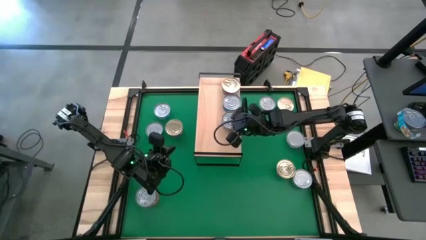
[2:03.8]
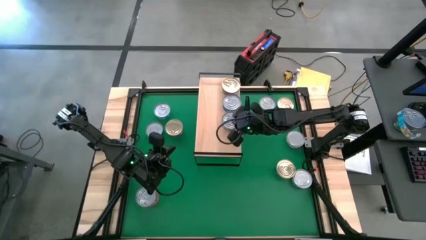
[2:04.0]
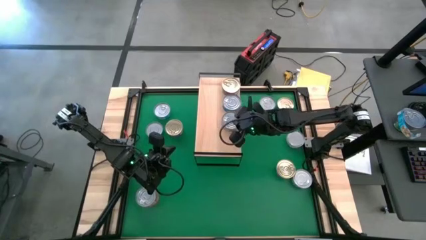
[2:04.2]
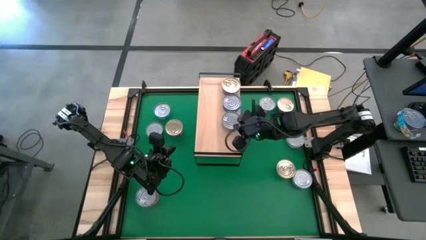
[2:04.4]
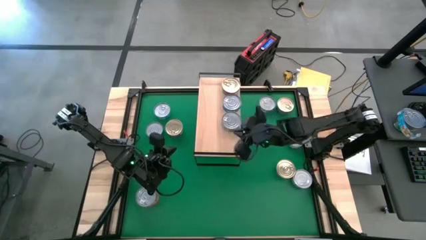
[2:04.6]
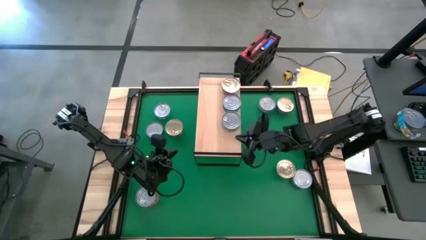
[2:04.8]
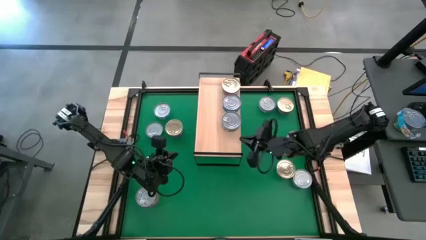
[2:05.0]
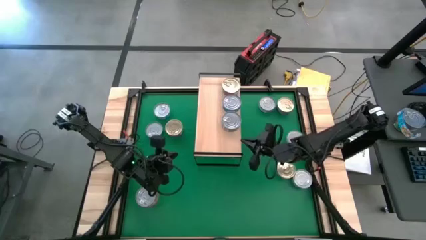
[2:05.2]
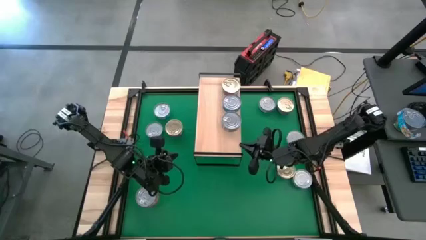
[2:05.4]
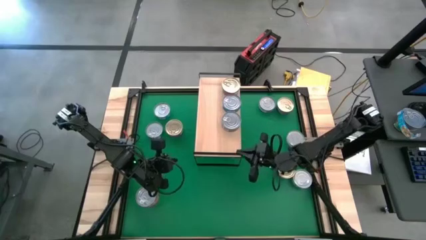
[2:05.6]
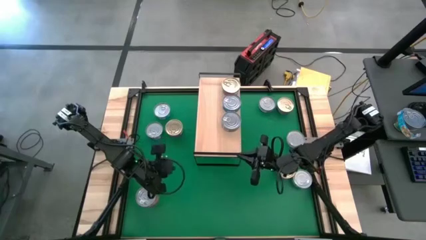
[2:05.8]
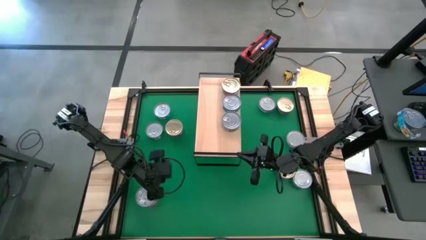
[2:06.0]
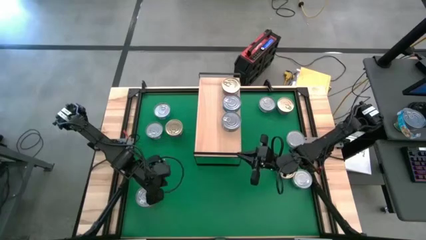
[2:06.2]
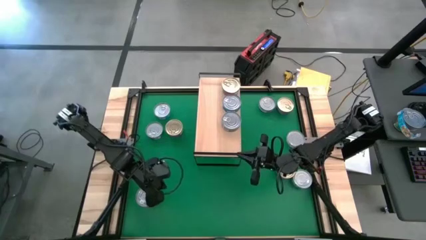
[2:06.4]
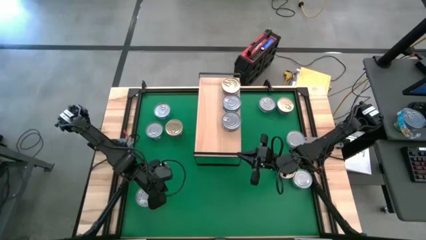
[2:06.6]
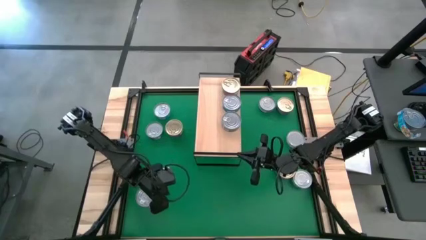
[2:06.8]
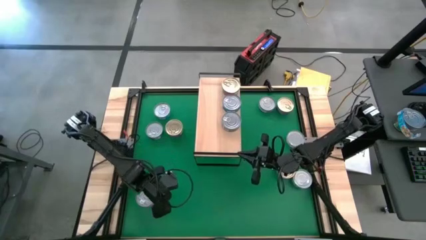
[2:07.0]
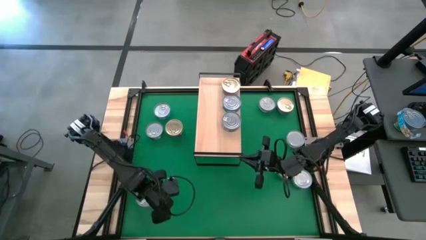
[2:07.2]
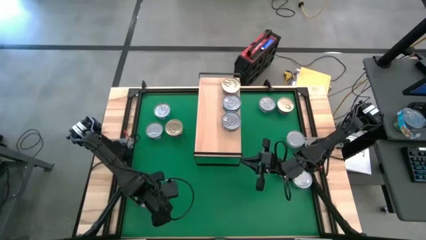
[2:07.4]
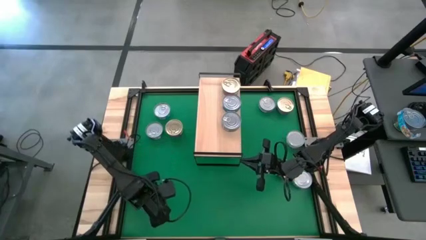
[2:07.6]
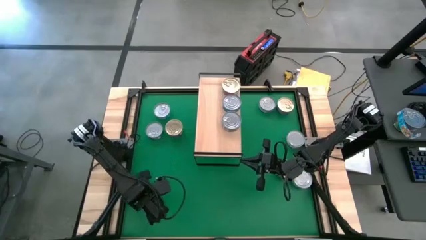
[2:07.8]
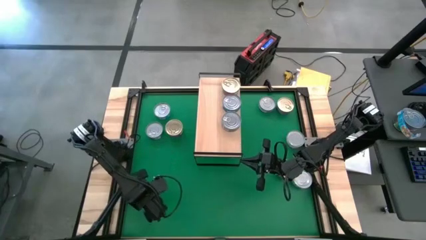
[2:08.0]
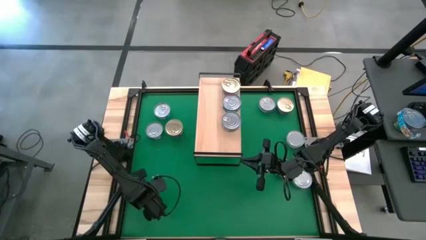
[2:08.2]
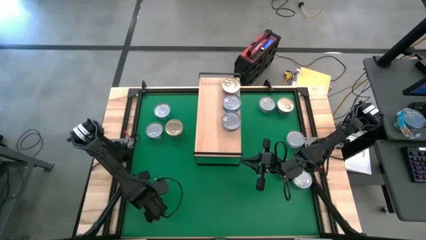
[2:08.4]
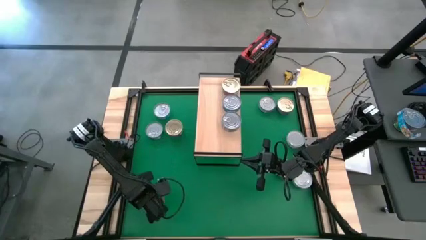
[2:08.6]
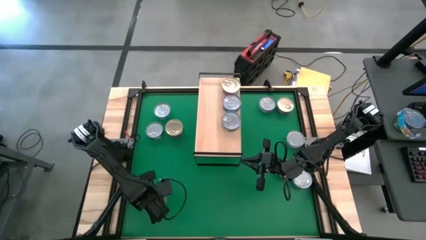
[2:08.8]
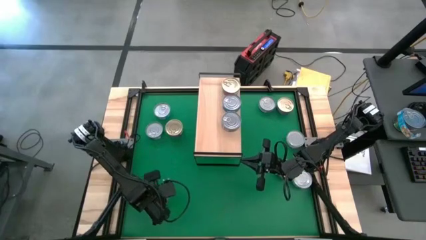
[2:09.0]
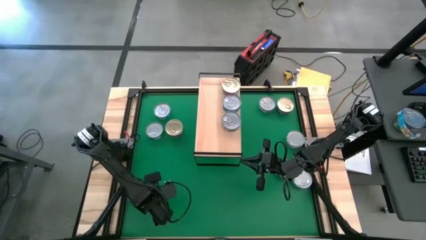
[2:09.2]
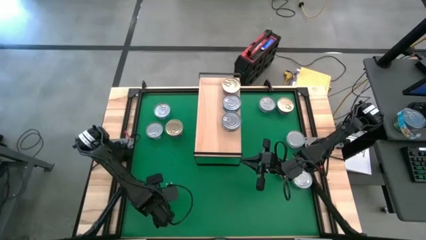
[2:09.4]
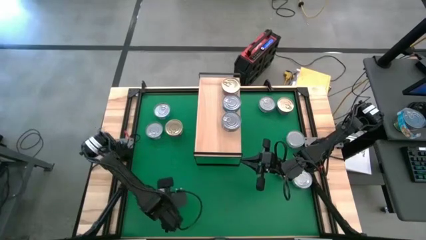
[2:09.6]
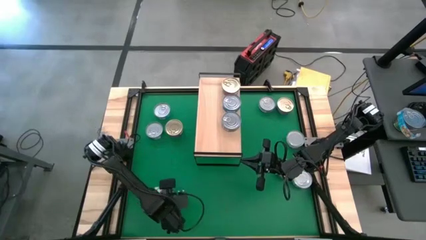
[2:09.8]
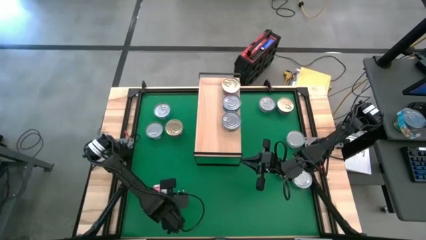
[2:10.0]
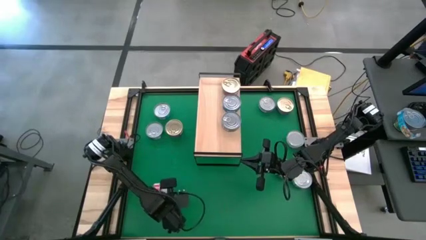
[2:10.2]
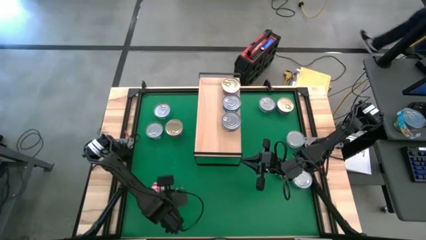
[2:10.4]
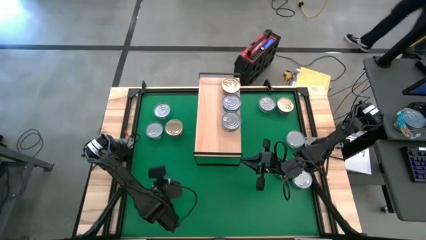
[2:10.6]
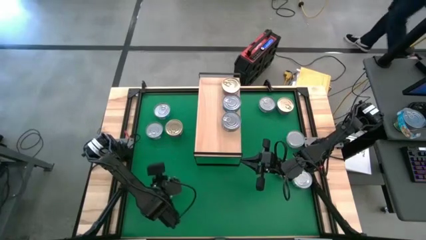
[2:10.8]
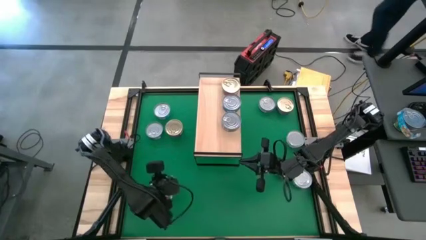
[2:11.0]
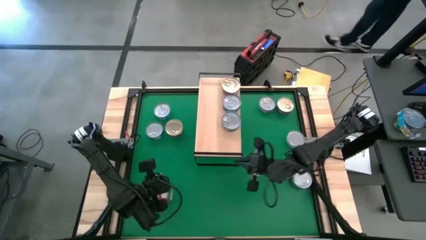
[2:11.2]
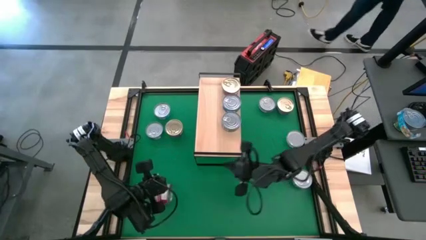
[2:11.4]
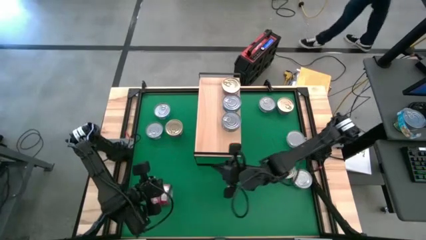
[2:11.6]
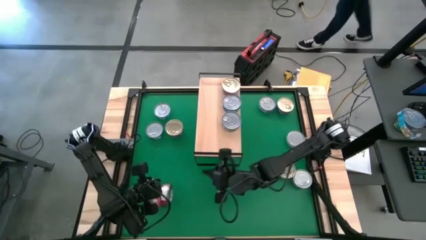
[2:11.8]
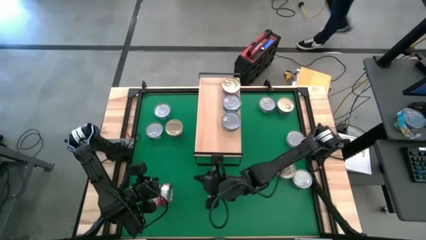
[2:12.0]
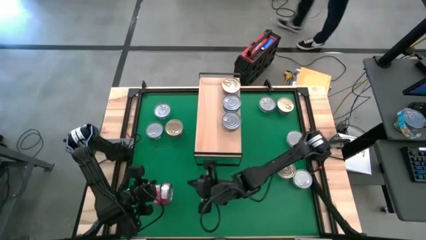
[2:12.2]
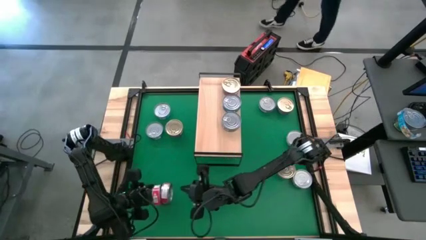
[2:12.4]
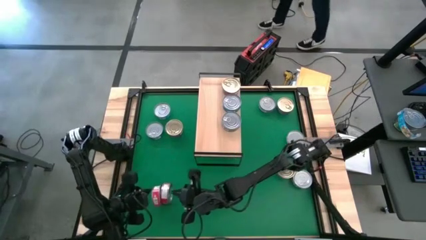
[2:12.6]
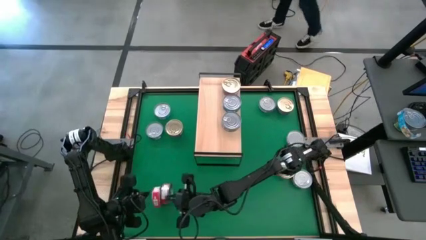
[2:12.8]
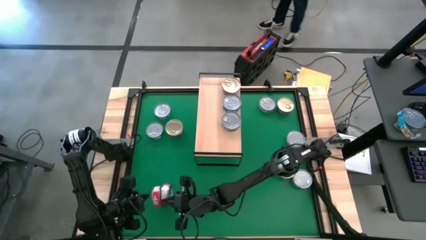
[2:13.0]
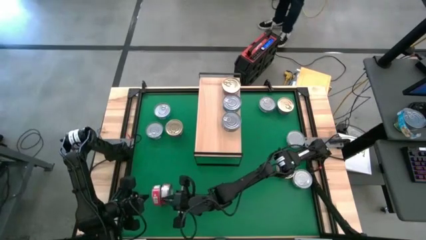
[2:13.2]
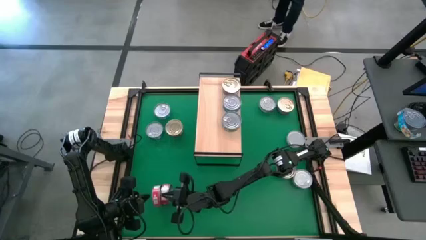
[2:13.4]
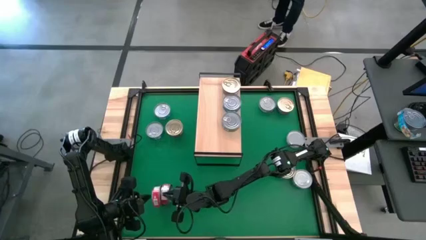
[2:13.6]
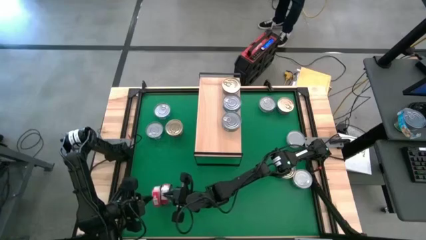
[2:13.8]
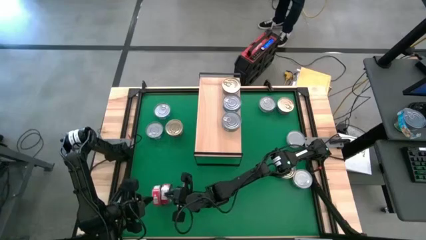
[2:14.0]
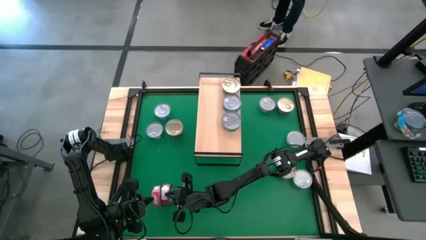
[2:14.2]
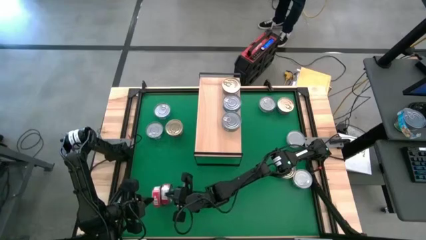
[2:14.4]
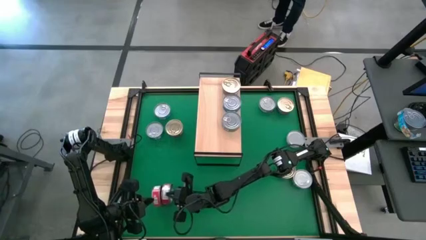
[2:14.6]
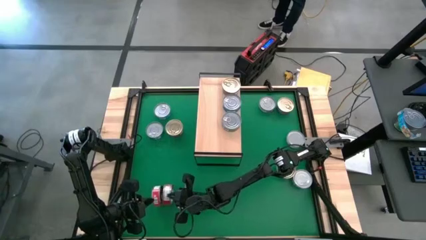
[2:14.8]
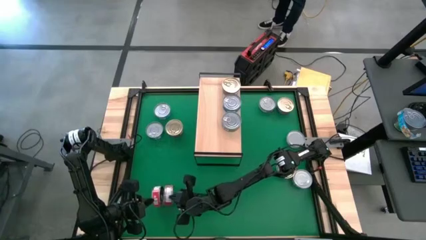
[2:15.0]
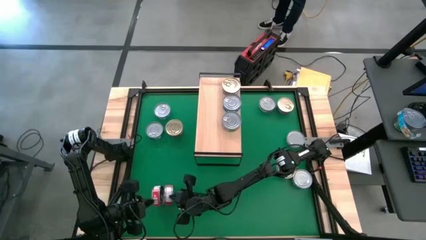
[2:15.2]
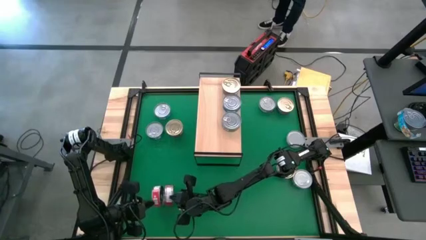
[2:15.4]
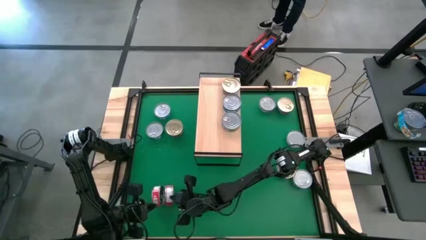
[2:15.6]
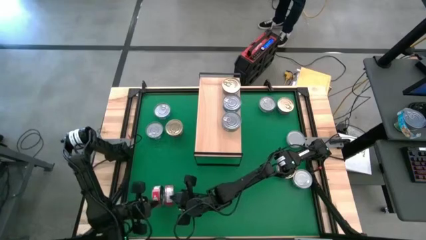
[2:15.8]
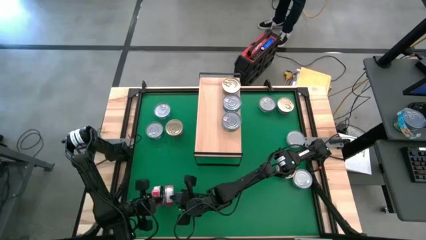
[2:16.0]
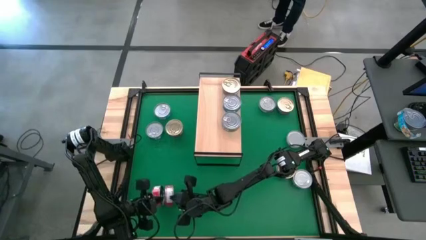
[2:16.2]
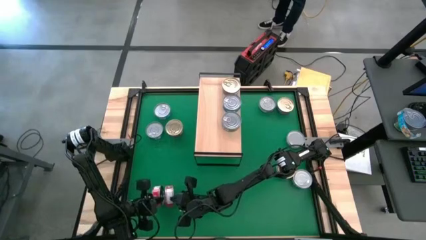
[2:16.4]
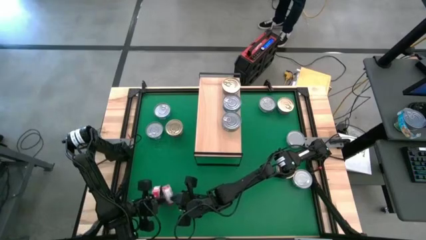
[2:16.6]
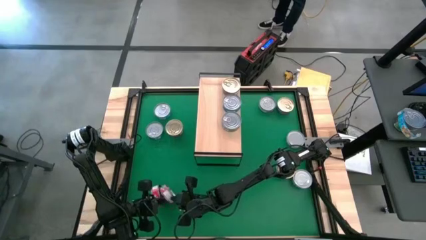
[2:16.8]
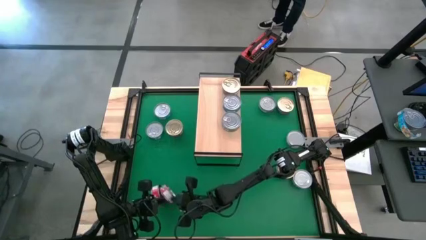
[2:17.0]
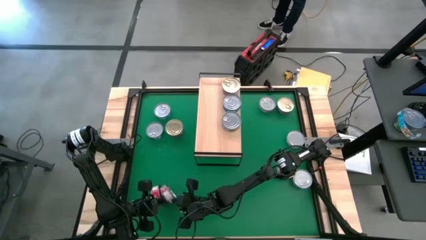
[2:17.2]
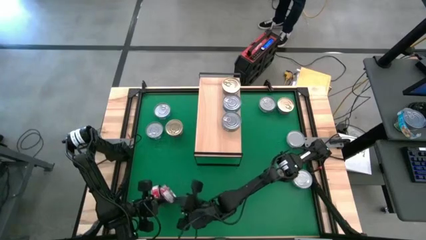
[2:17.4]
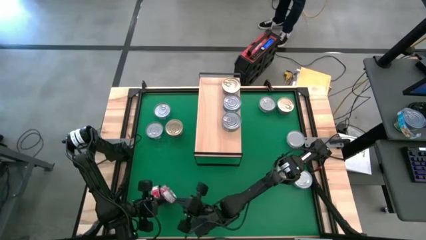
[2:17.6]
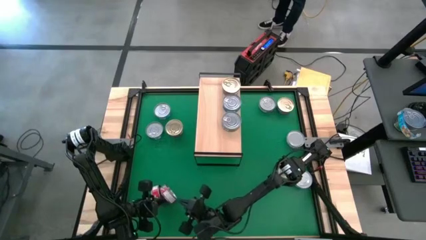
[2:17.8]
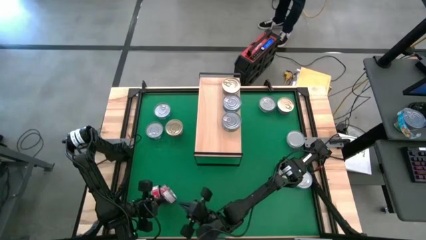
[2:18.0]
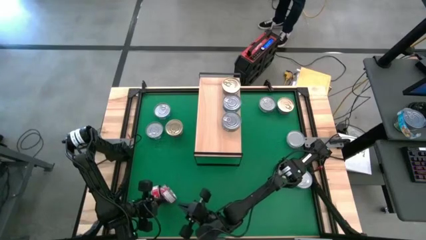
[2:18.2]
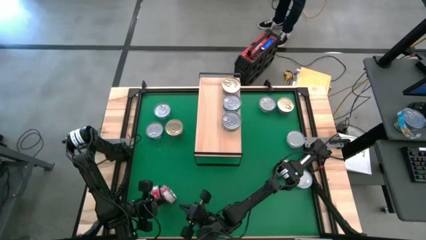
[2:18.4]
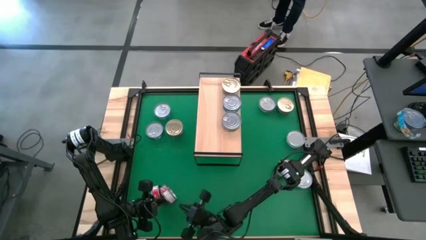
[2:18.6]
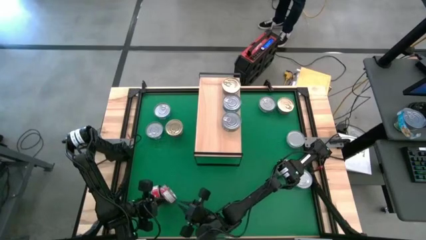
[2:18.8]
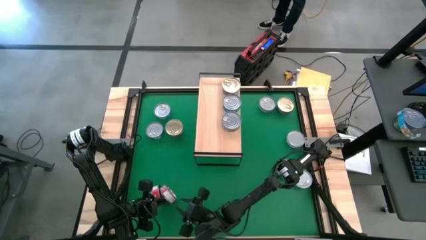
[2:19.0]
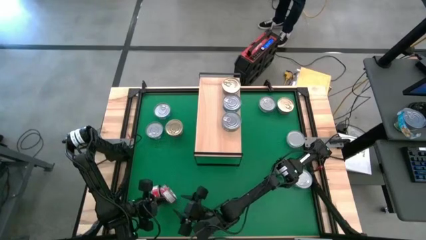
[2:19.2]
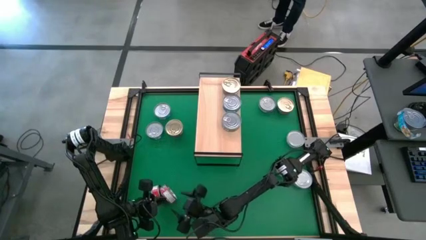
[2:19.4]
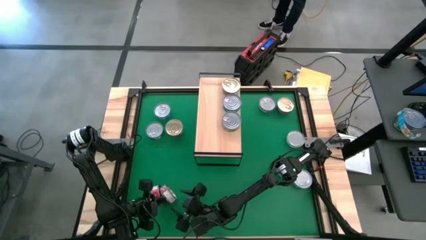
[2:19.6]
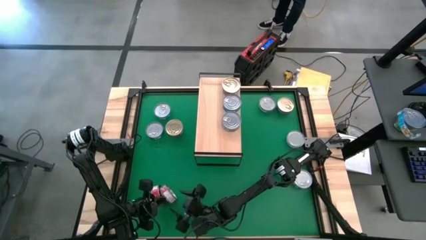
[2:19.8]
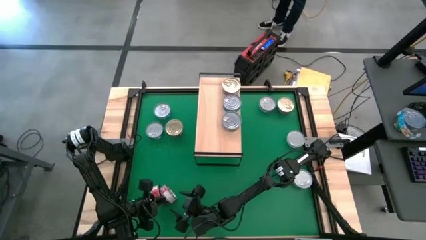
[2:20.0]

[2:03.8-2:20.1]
Task: Stack canned seafood by type on shelf
Put the right red tuna can on the shelf
